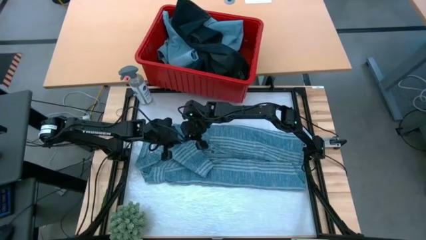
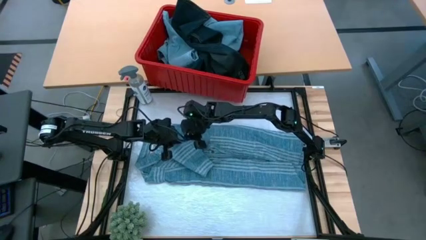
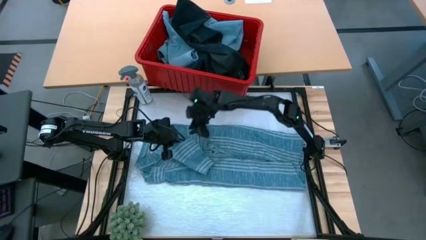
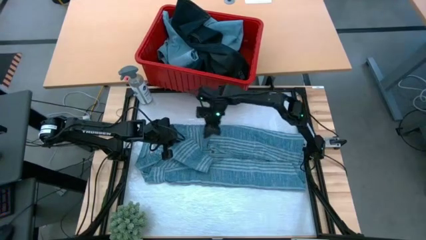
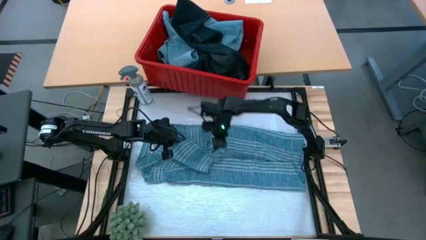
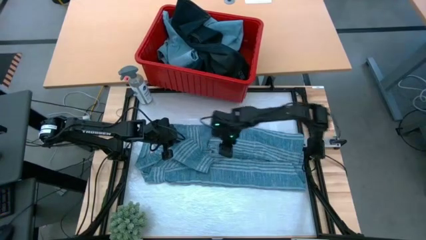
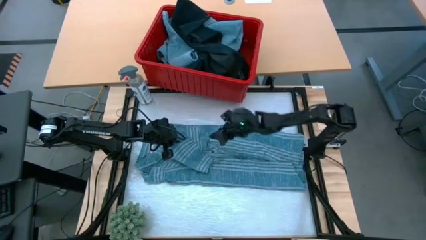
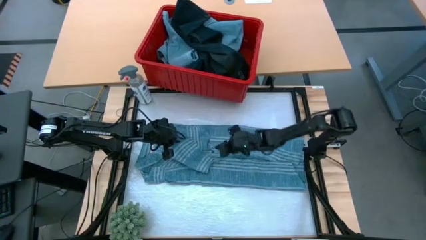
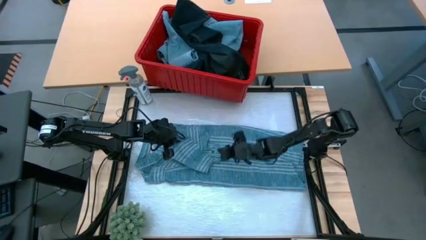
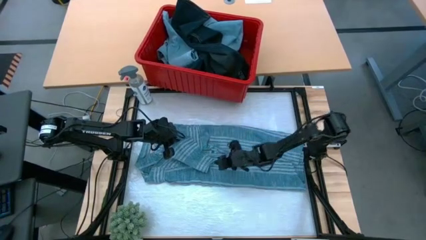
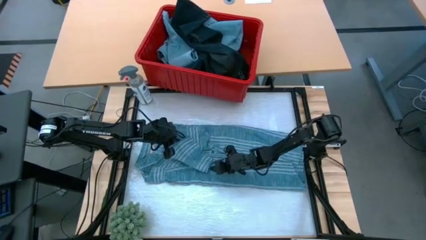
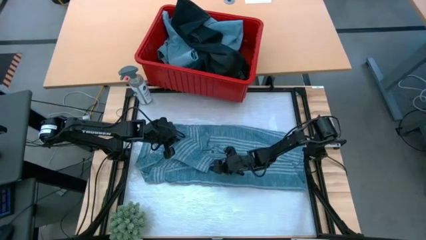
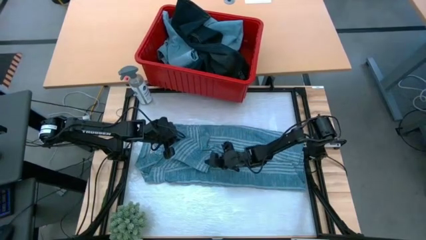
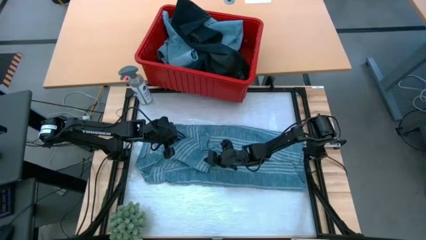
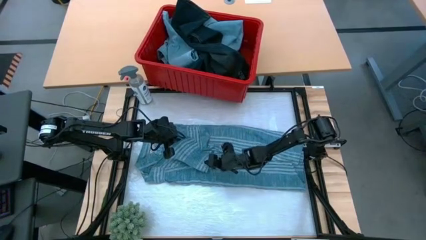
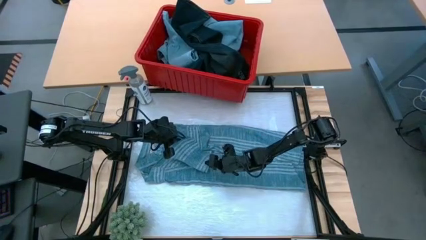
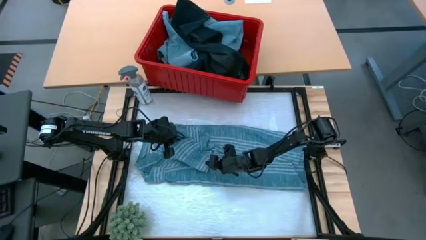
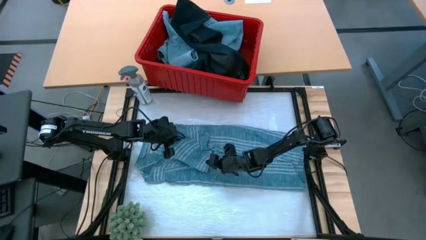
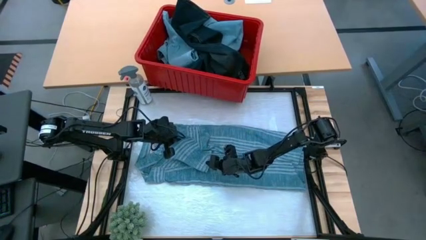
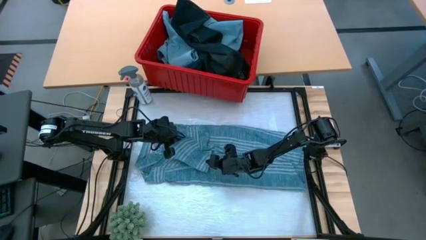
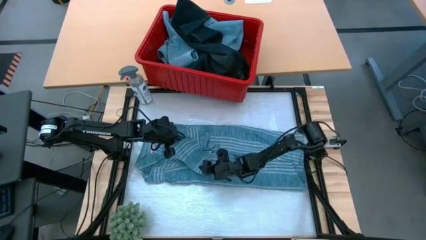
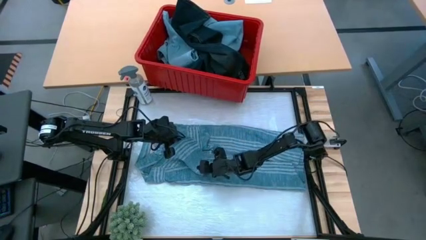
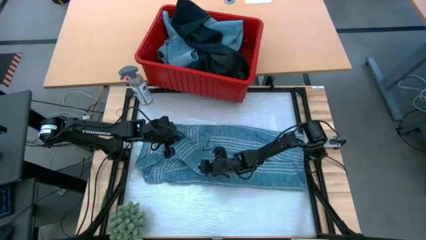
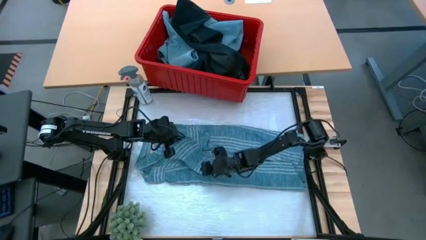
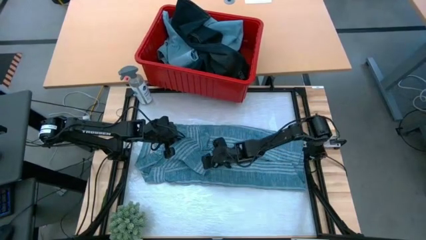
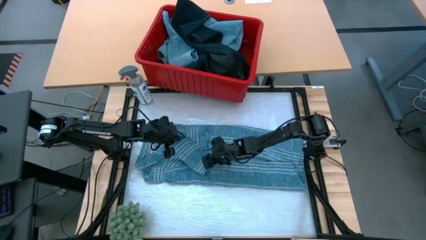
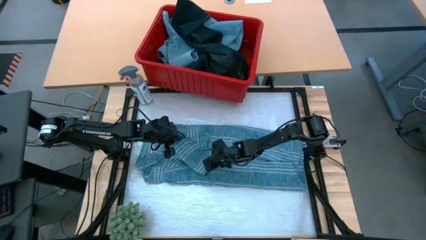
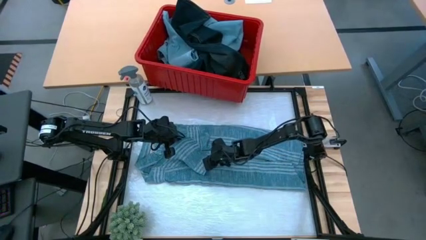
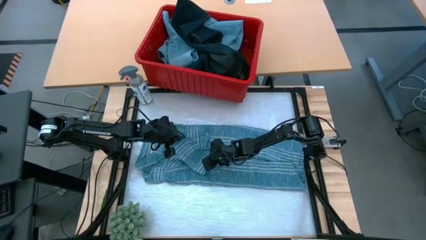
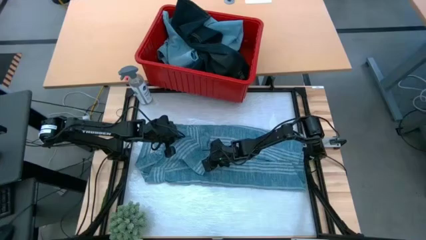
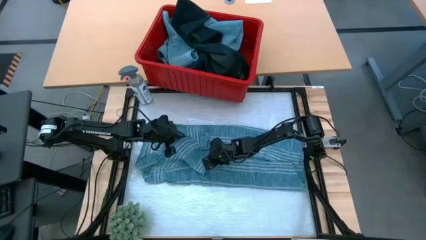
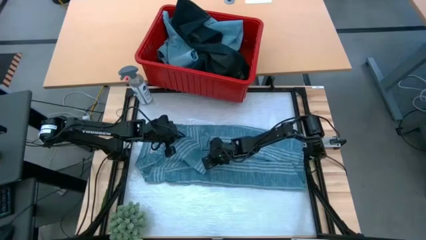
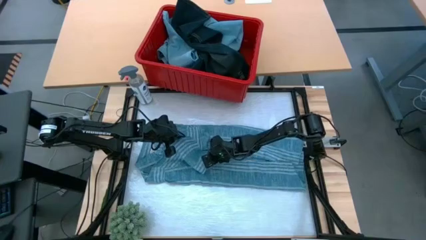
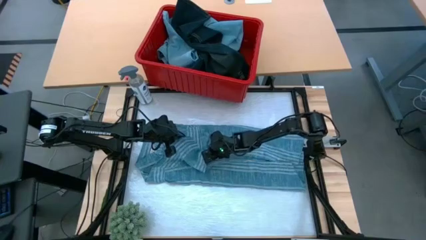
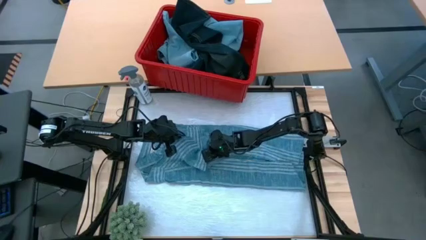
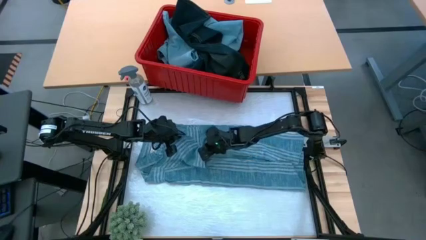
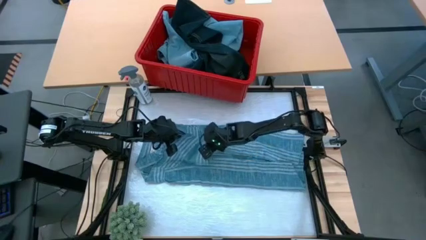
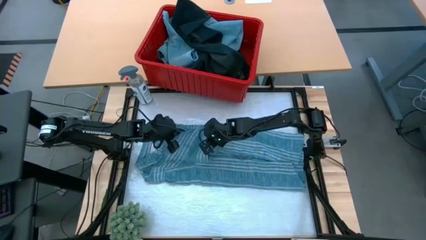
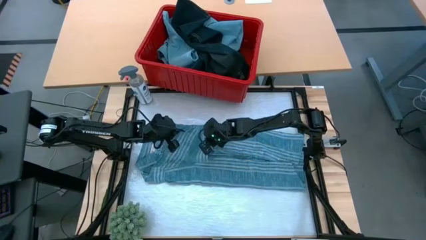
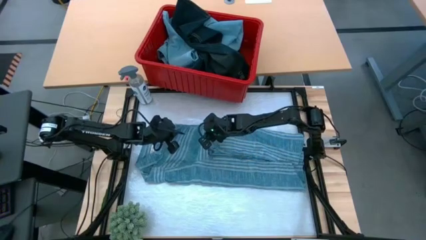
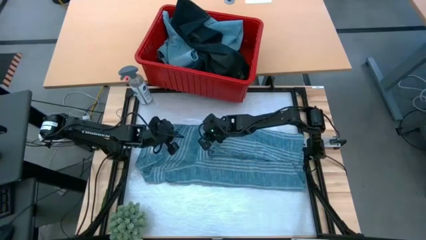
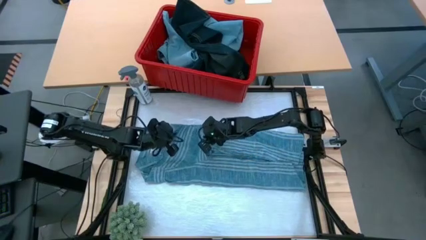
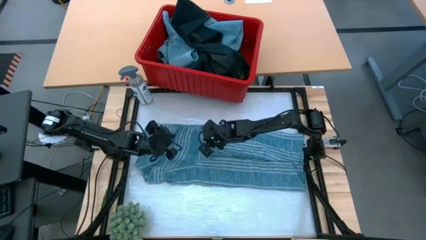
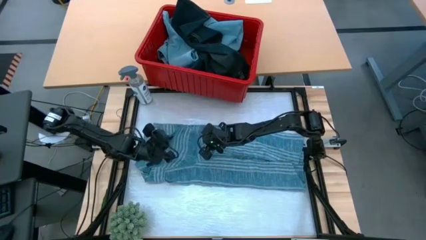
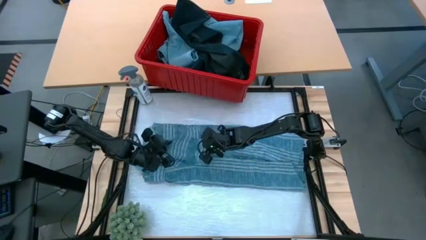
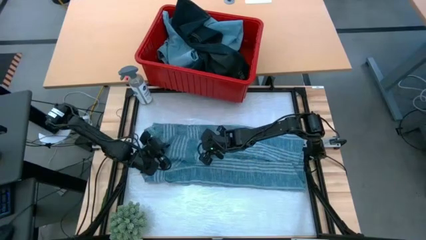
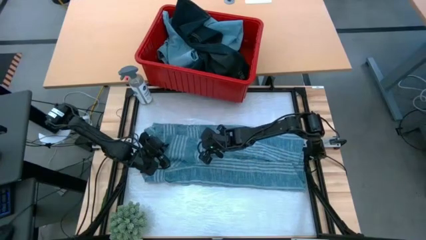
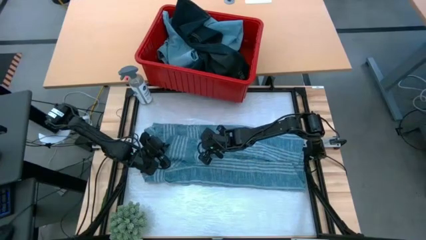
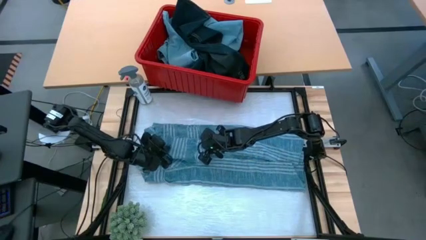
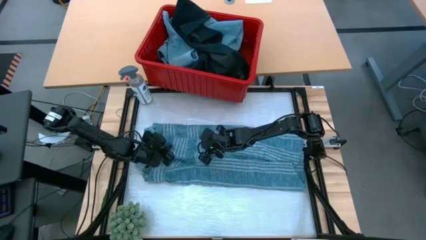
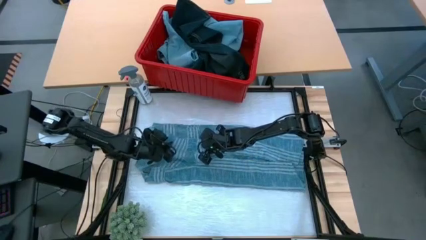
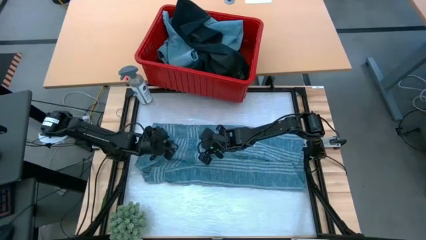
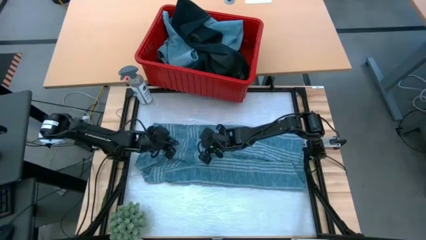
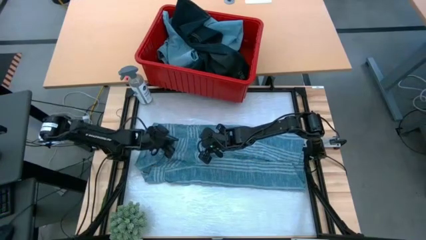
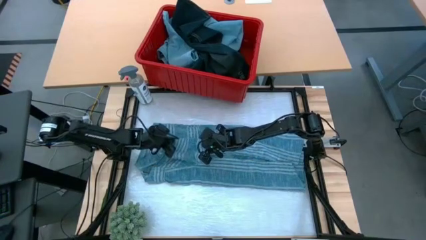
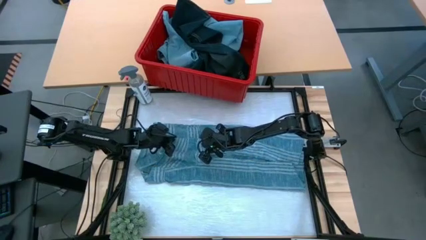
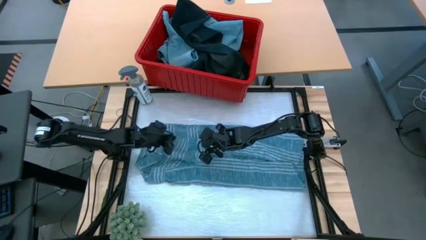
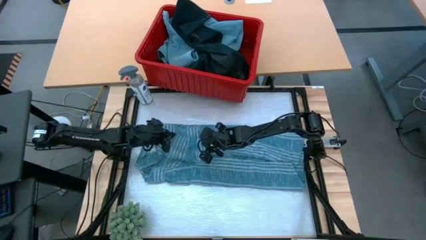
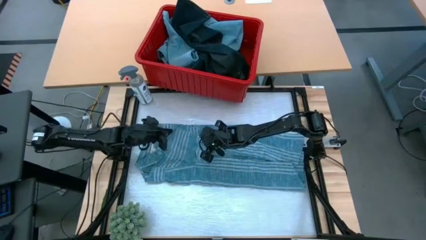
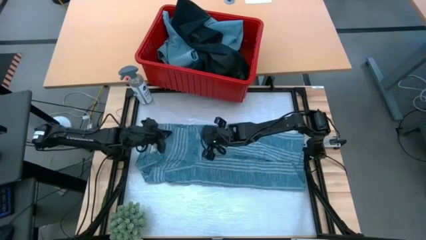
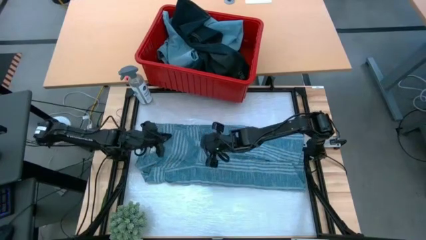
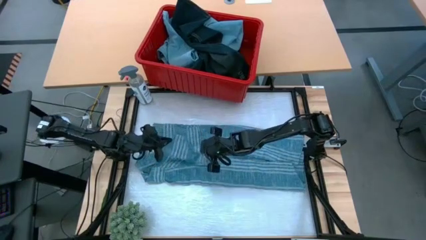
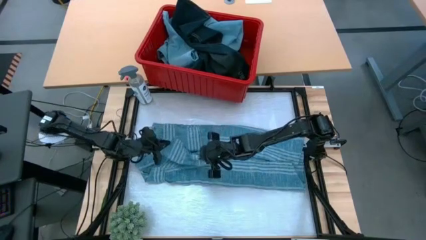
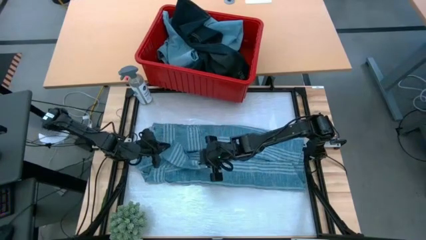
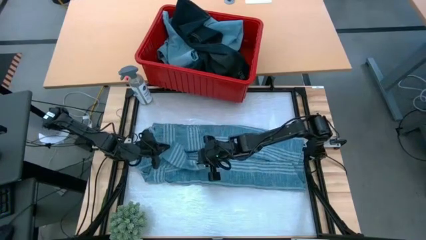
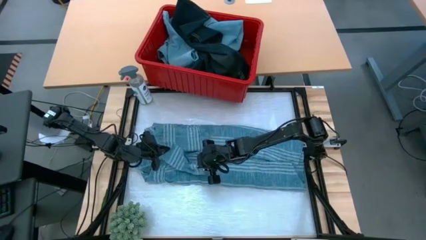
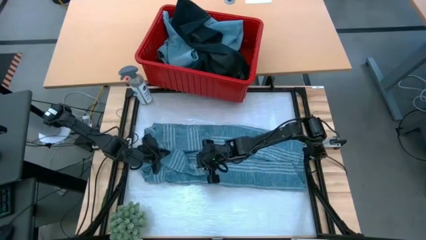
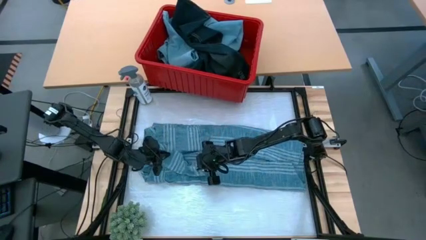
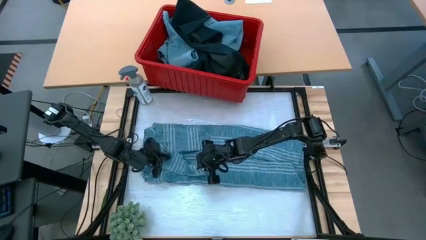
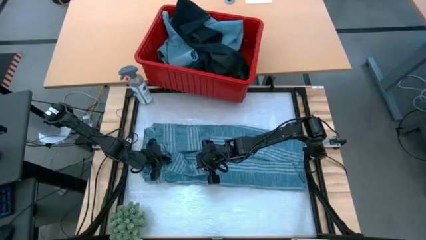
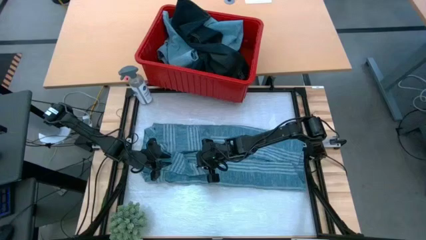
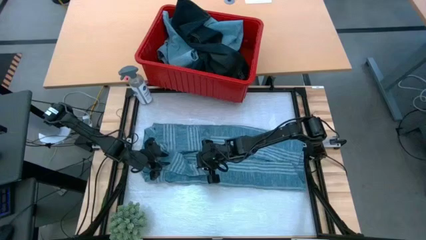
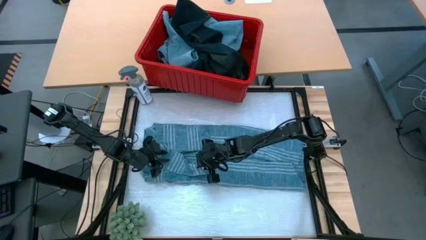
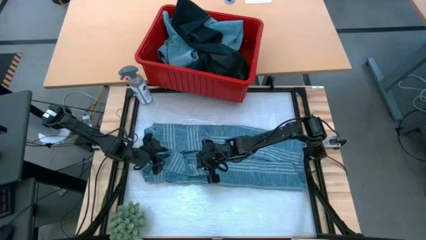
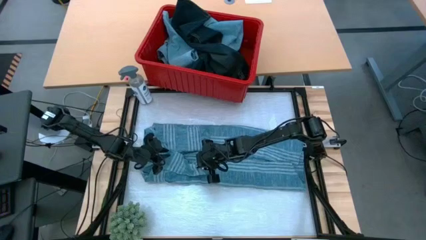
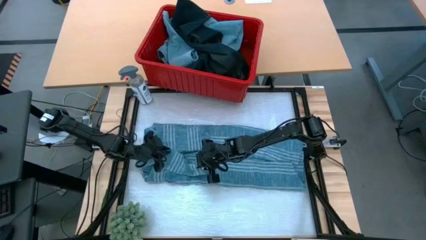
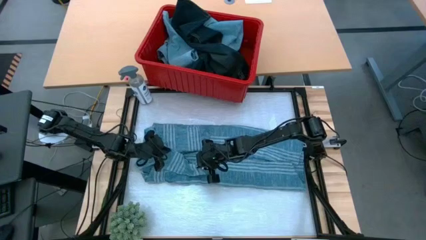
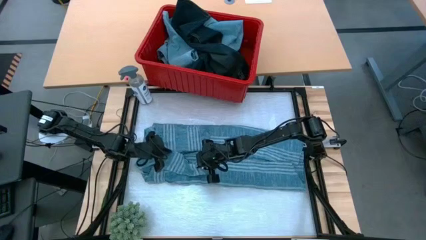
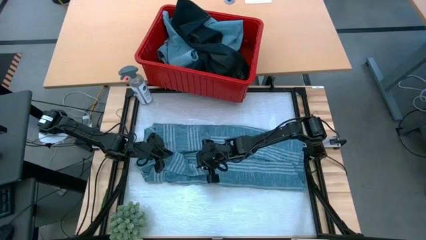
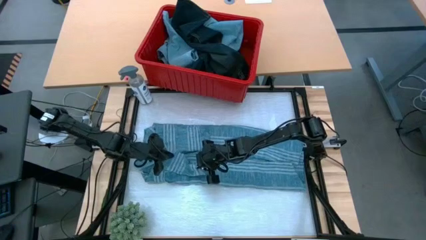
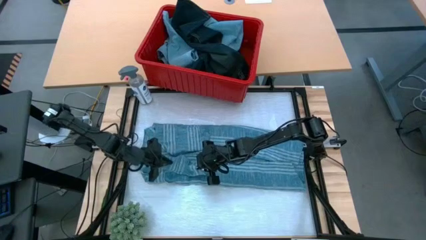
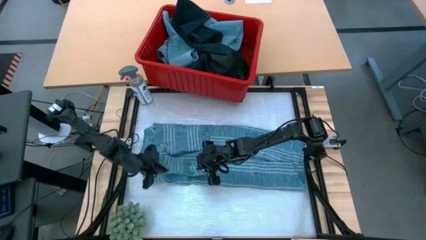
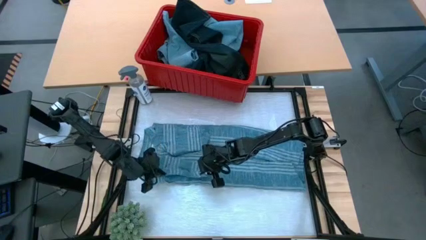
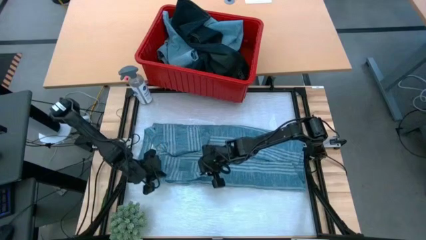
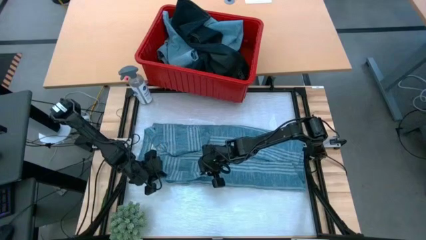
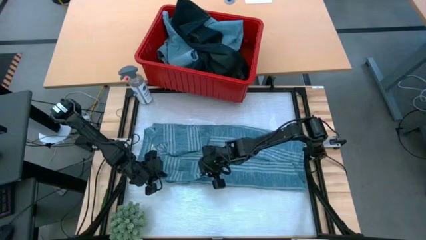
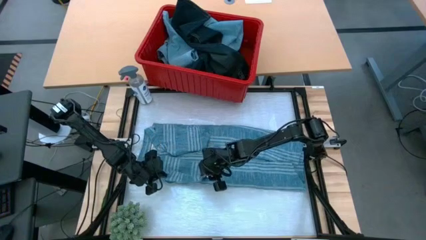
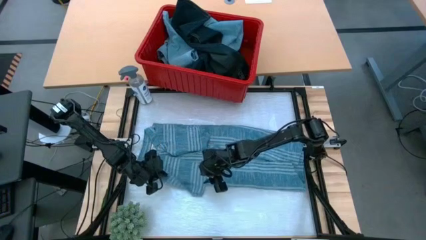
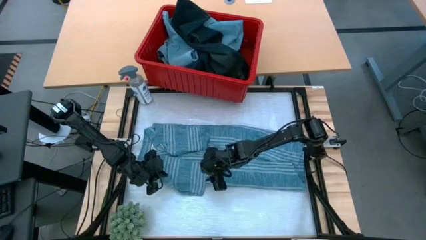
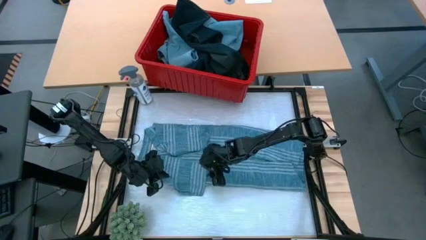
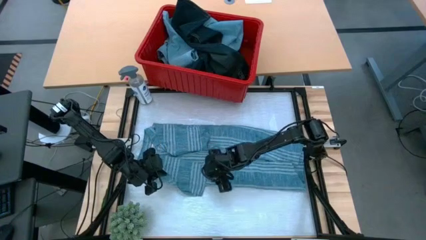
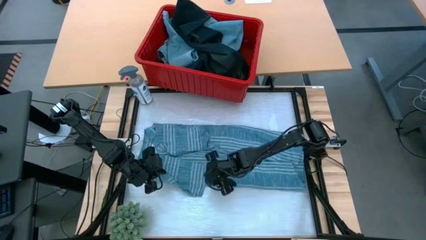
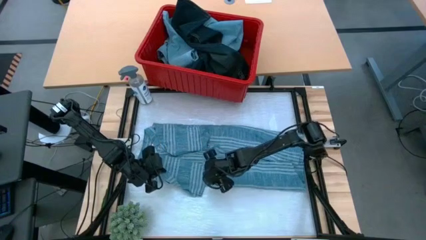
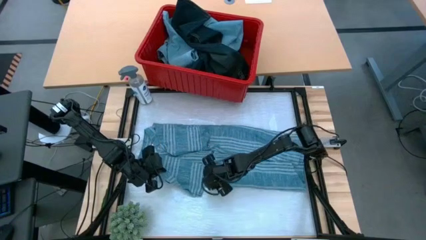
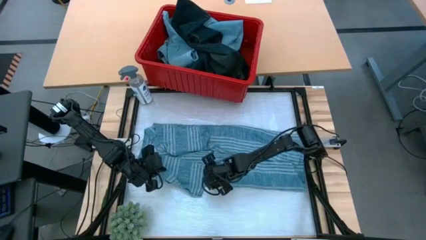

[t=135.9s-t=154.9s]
Task: Fold Laundry from Bin
Fold the light blue shirt
